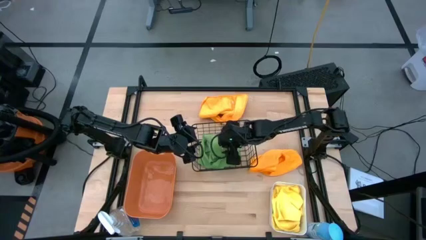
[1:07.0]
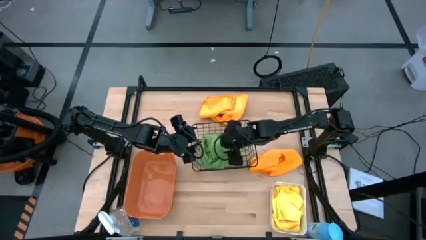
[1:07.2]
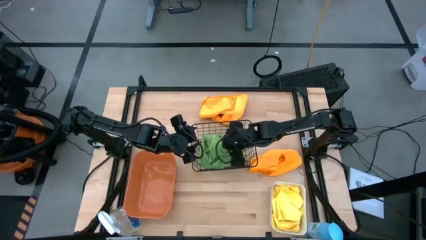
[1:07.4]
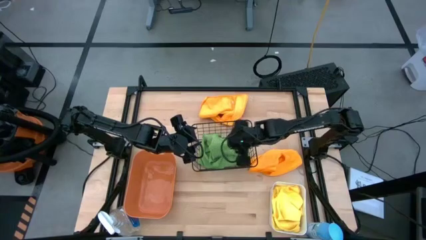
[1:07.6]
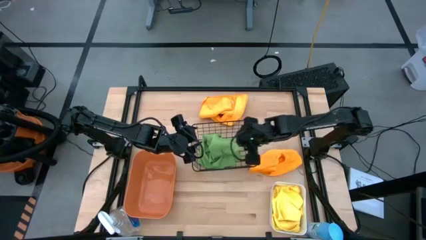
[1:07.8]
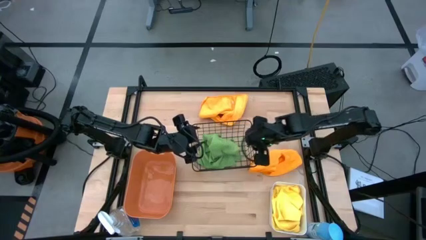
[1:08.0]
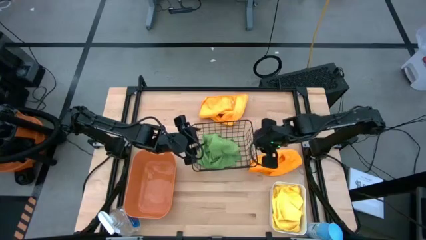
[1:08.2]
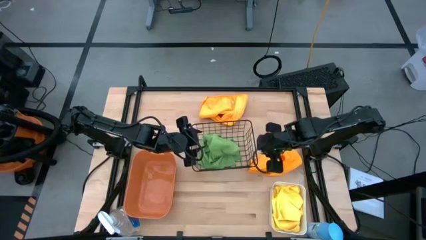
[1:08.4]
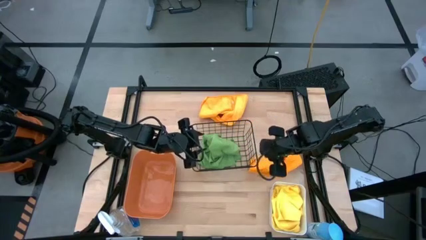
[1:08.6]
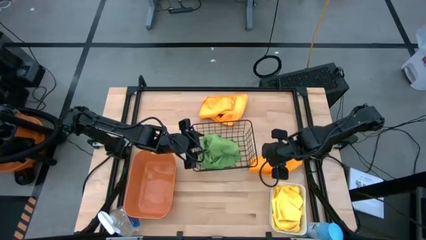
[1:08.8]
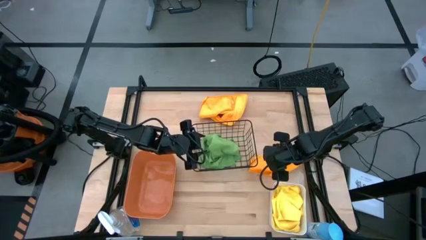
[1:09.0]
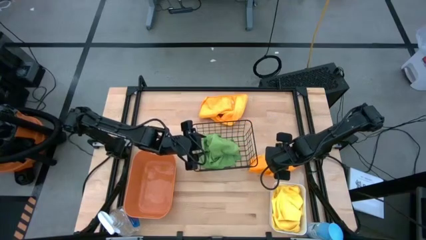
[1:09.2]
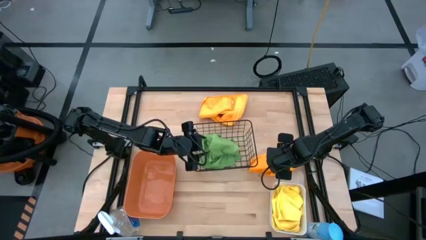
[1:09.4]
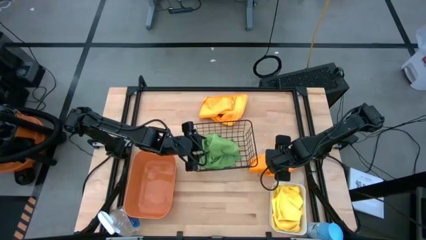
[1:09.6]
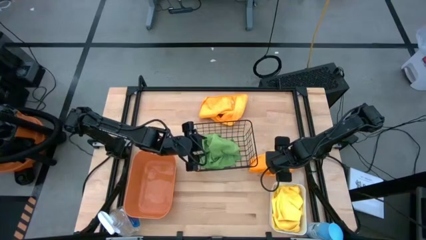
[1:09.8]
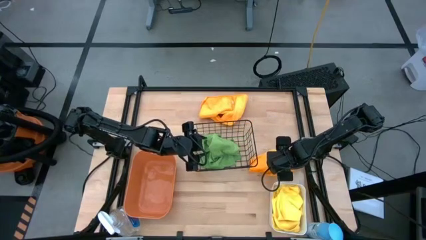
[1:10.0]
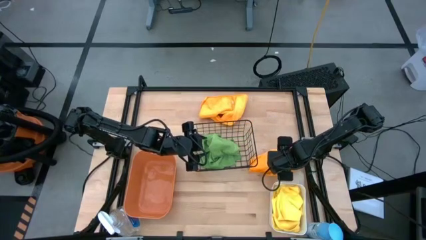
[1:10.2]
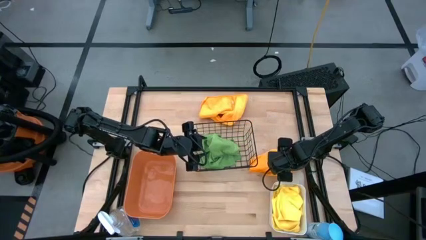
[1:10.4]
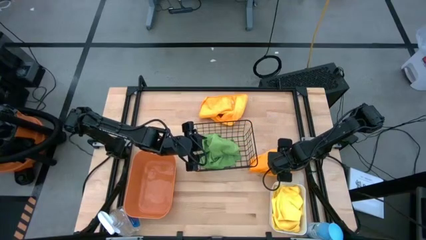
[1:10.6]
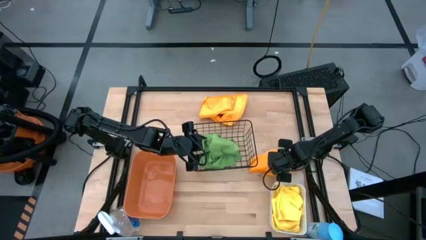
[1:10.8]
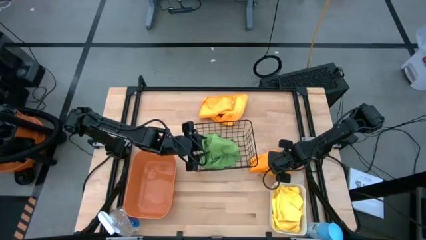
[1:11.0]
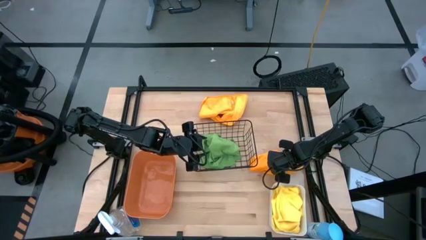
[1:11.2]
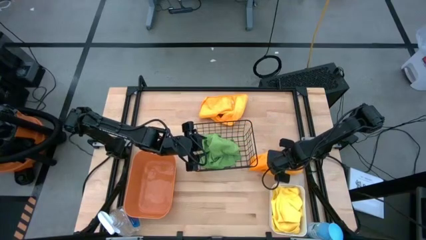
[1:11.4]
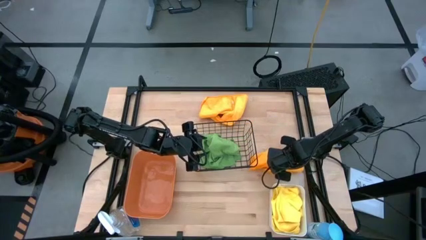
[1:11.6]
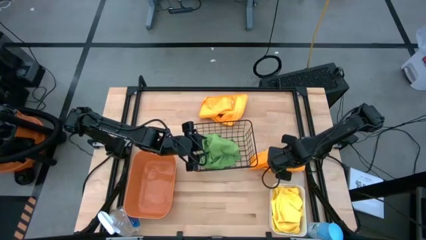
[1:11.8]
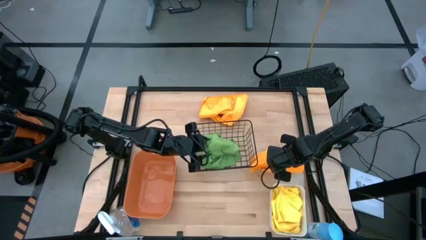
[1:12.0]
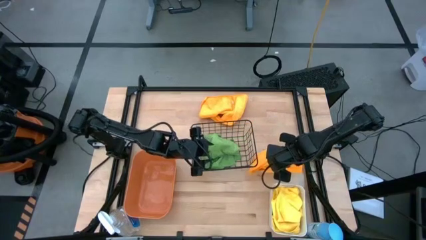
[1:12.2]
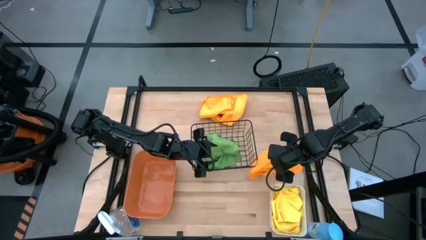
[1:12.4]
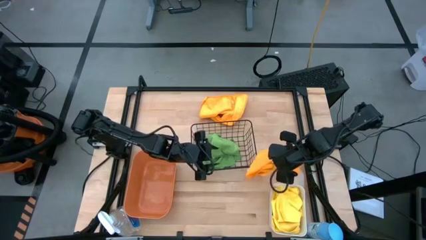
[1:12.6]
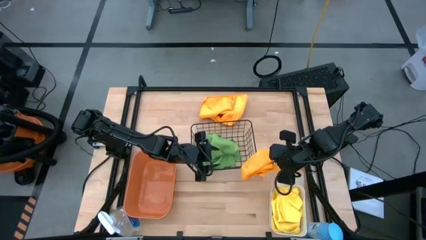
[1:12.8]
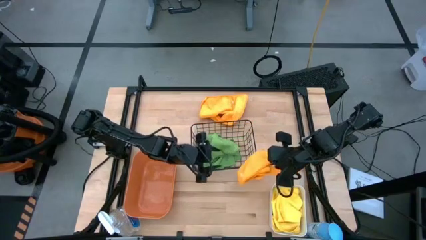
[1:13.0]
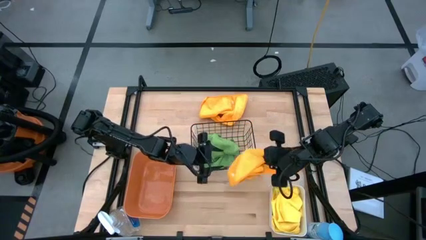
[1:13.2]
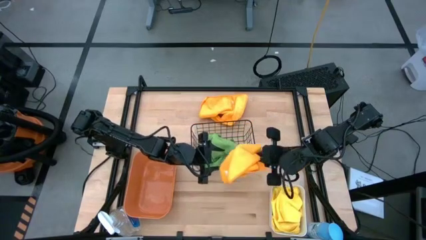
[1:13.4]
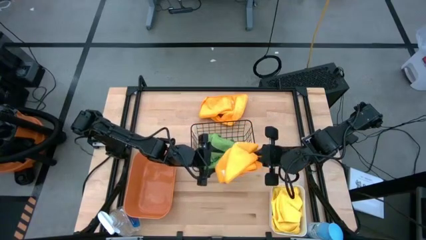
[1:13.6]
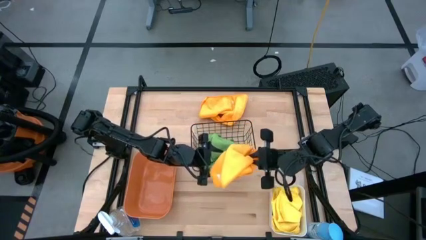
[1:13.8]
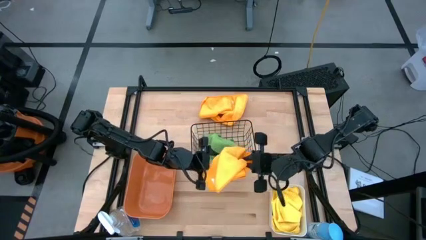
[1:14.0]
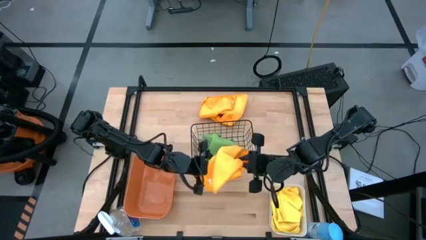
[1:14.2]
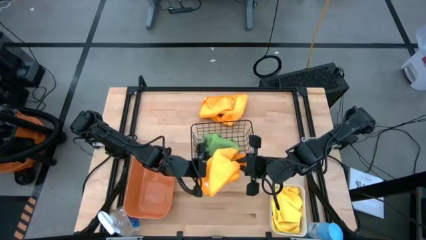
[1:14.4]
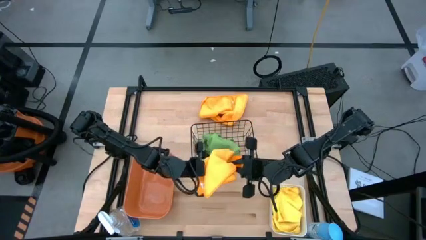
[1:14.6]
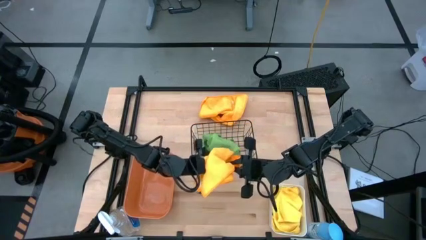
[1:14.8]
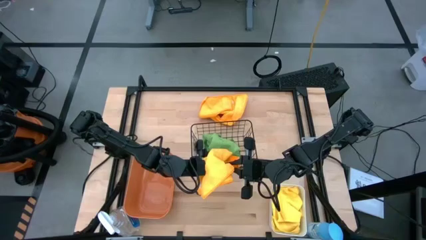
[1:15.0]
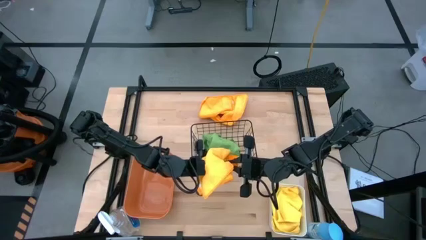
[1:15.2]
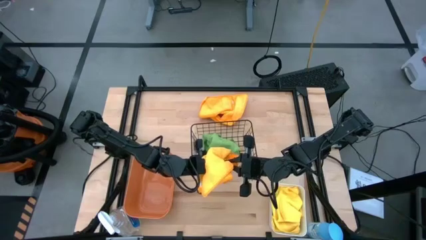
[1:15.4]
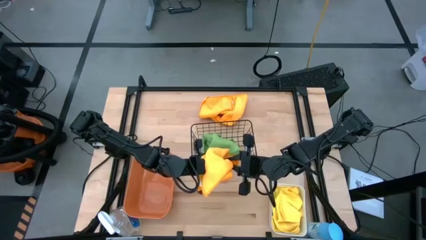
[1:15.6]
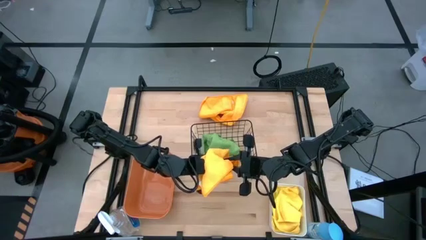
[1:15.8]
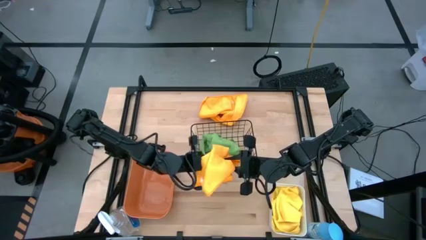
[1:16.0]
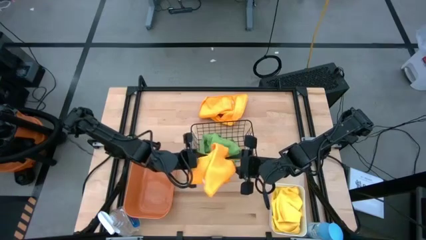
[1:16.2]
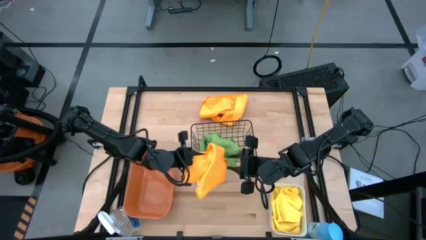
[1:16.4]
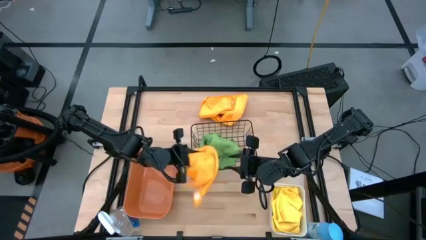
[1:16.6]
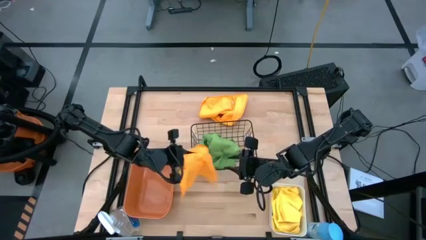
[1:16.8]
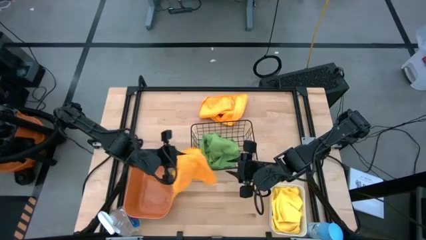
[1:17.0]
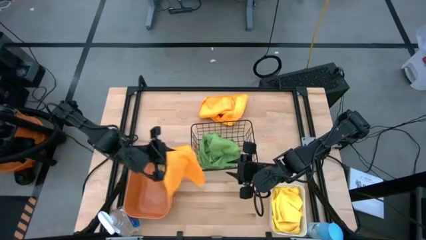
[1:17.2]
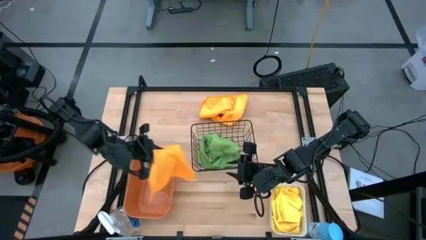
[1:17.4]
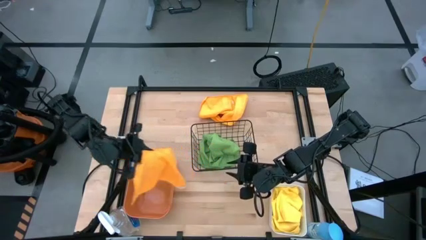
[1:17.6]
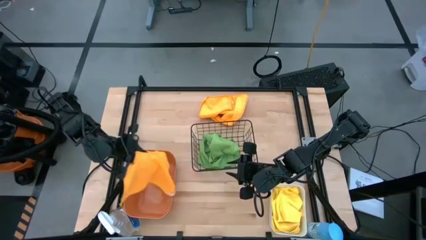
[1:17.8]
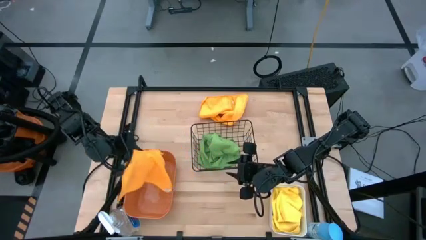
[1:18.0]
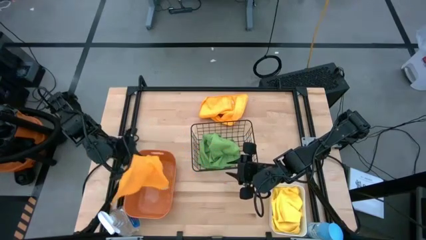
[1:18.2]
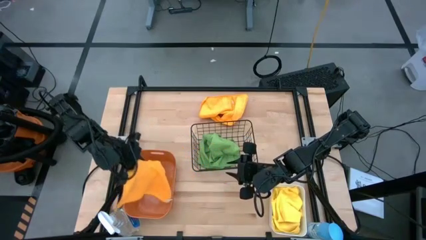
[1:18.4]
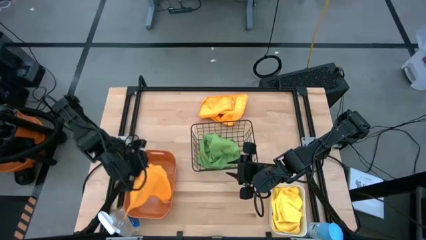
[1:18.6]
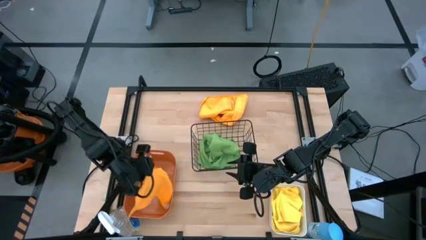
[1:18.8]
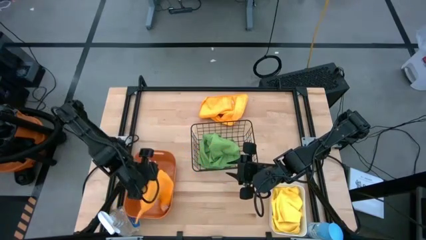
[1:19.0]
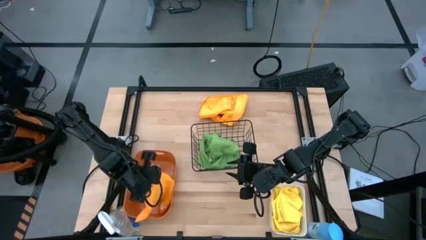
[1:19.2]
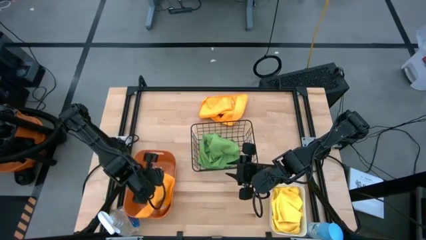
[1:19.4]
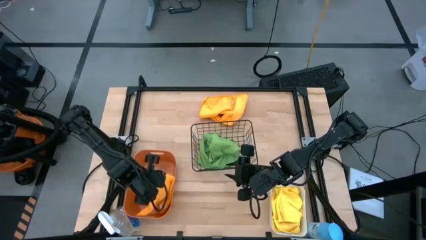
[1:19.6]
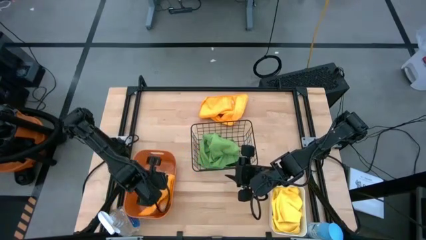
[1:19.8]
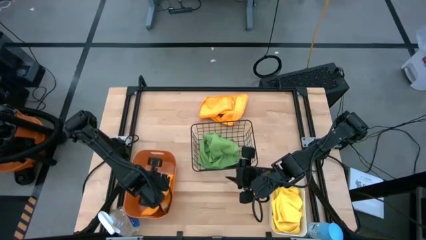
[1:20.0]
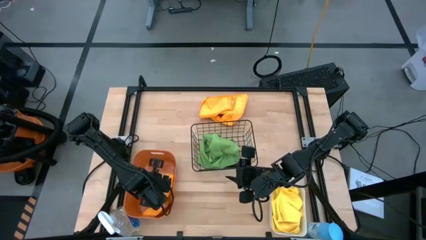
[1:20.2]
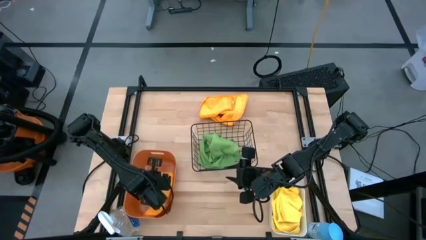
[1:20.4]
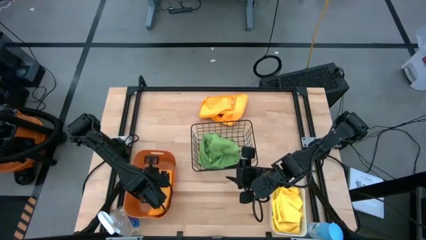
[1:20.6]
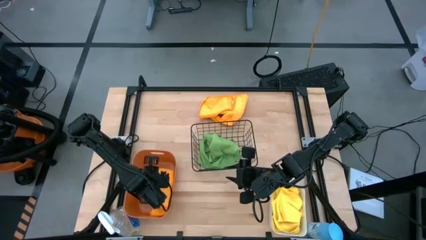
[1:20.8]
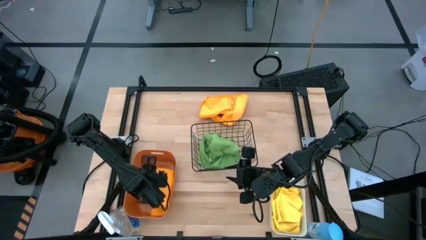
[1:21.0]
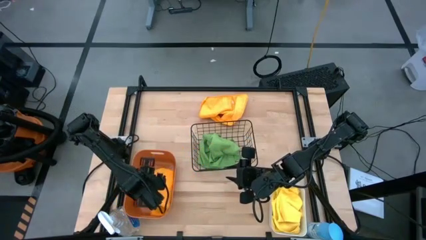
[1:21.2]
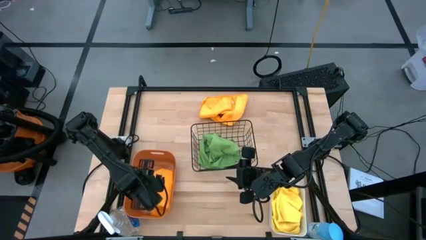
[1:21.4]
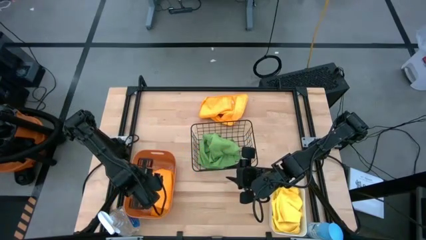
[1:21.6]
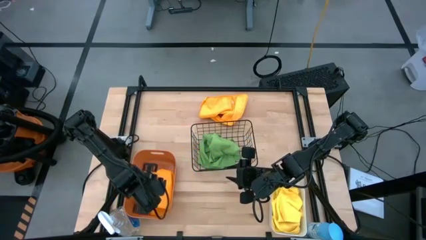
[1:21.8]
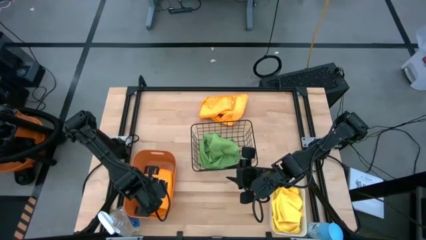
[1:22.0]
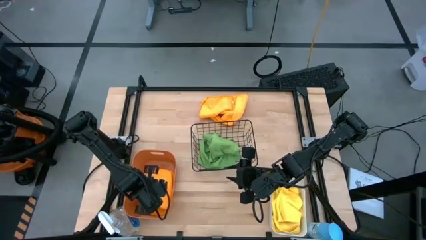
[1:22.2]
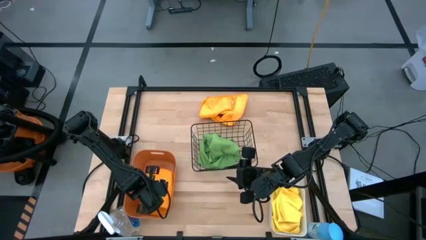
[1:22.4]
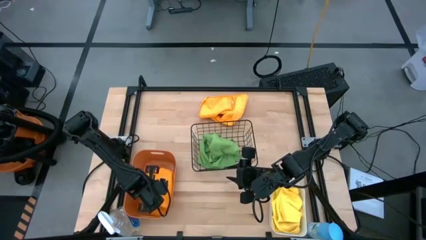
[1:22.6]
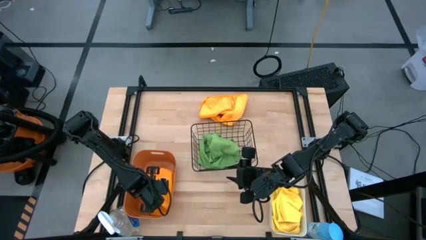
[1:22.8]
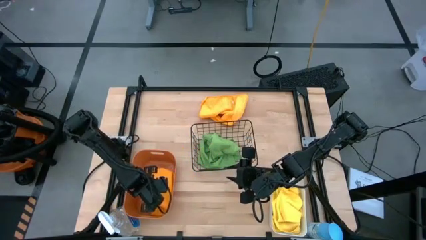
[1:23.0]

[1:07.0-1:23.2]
Task: Sort microfiber towel by color & place in baskets
Put the bottom orange microfiber cloth into the orange bin
